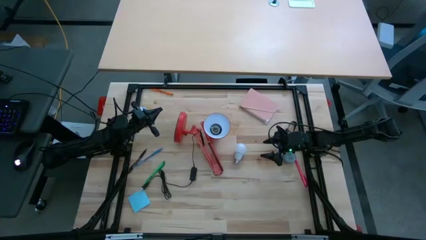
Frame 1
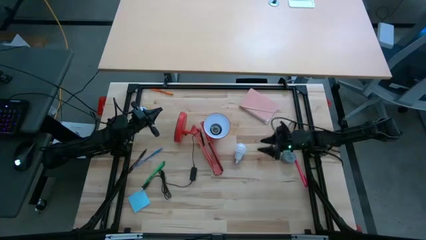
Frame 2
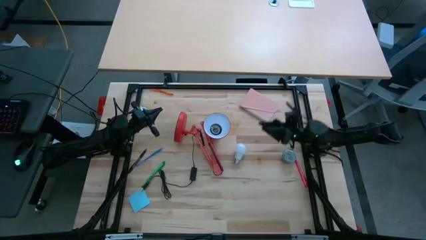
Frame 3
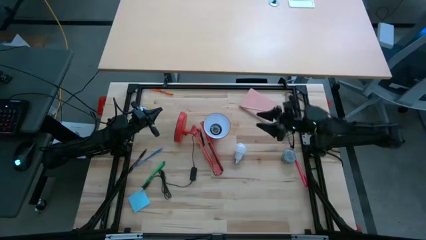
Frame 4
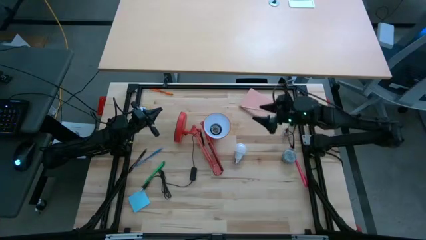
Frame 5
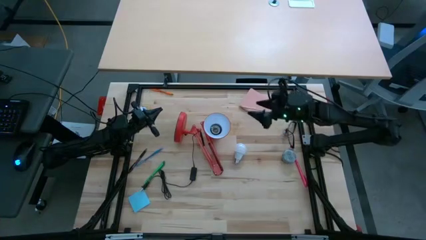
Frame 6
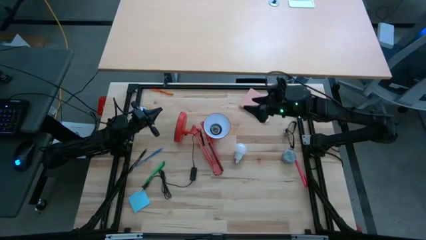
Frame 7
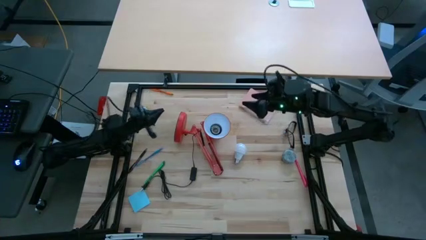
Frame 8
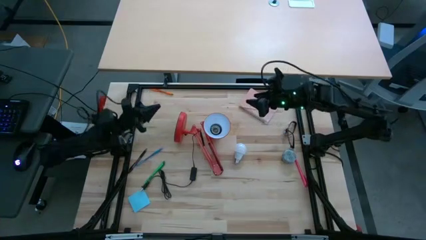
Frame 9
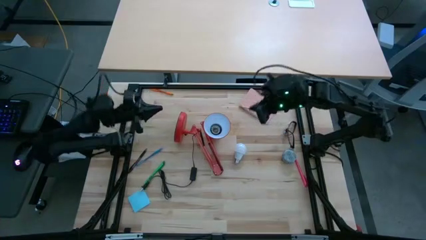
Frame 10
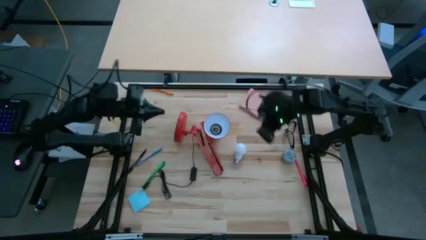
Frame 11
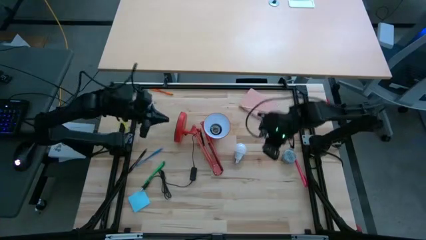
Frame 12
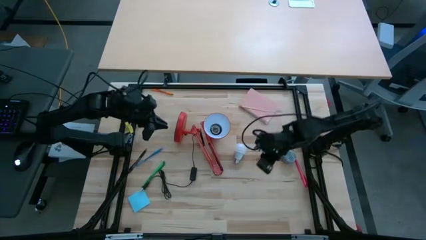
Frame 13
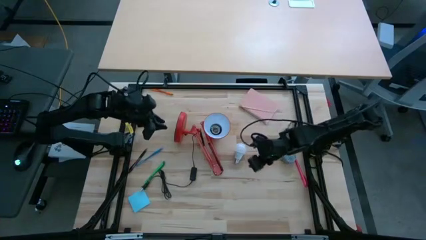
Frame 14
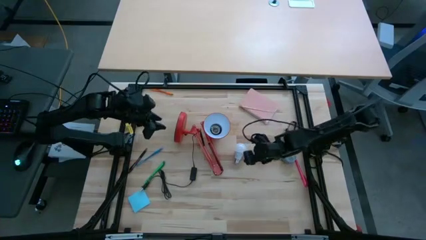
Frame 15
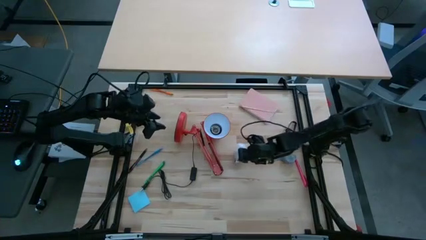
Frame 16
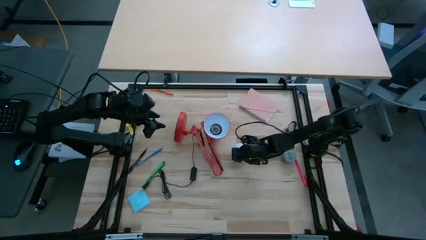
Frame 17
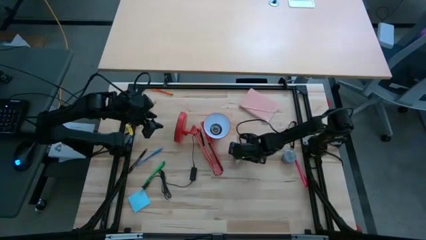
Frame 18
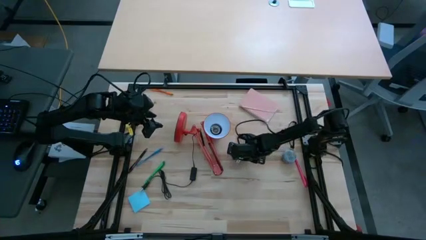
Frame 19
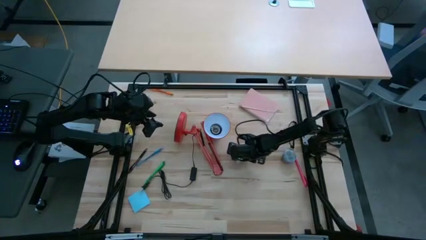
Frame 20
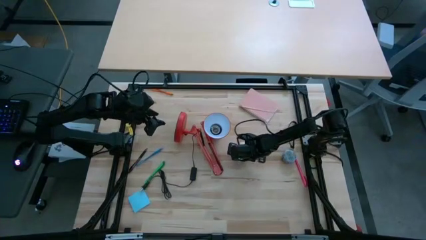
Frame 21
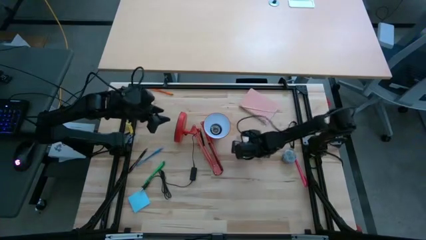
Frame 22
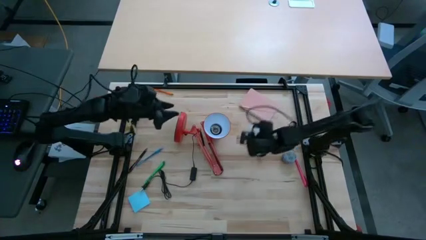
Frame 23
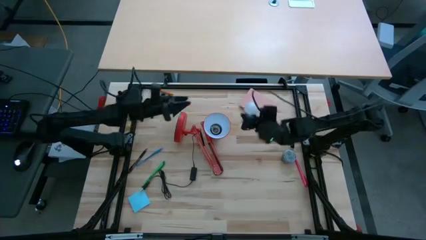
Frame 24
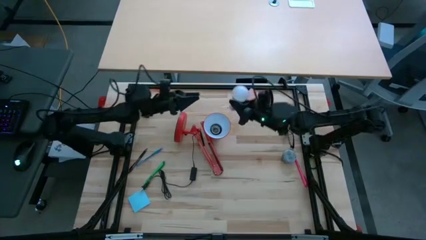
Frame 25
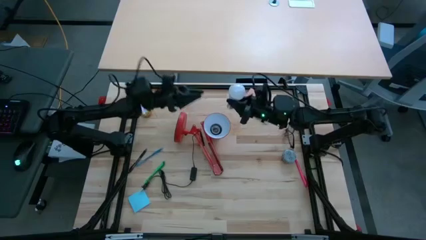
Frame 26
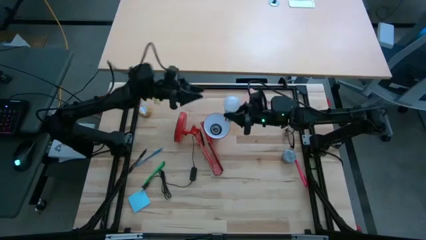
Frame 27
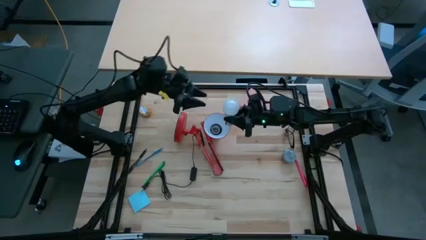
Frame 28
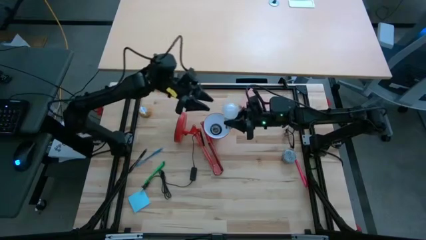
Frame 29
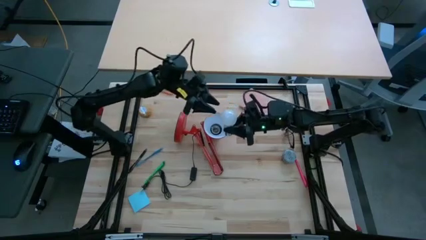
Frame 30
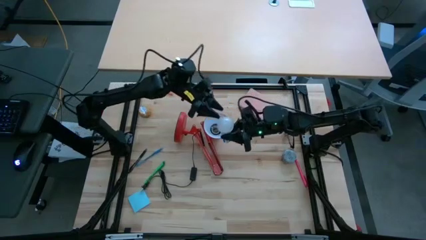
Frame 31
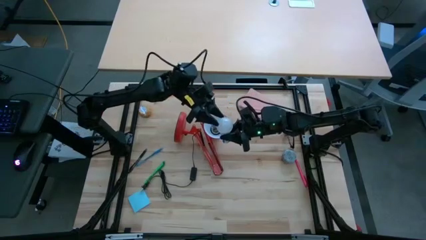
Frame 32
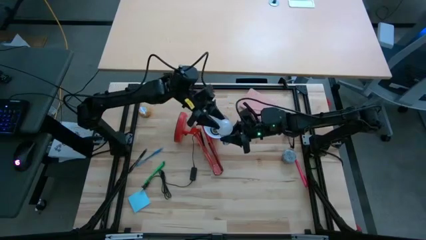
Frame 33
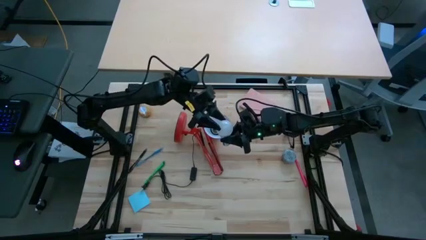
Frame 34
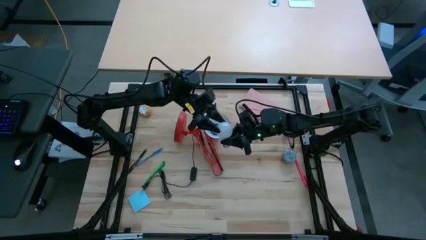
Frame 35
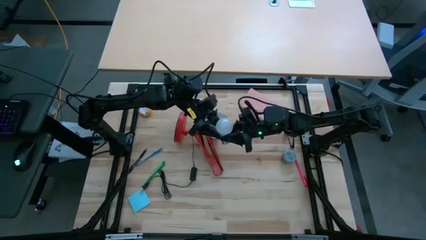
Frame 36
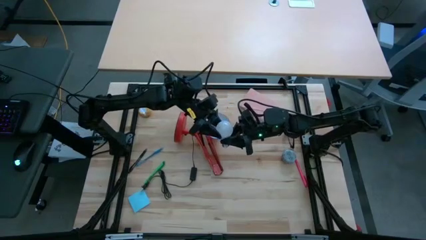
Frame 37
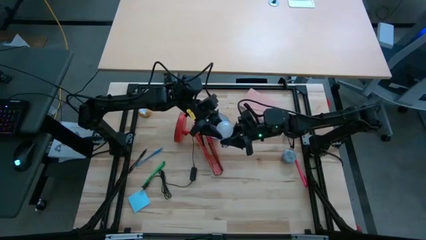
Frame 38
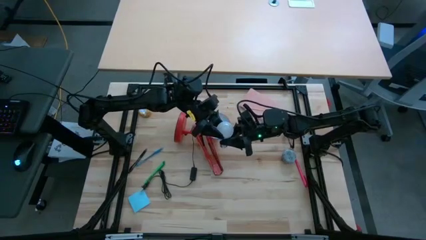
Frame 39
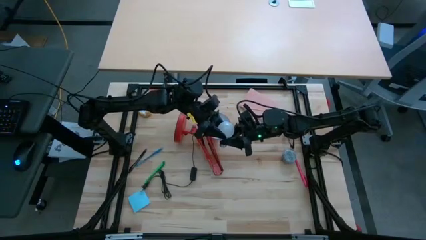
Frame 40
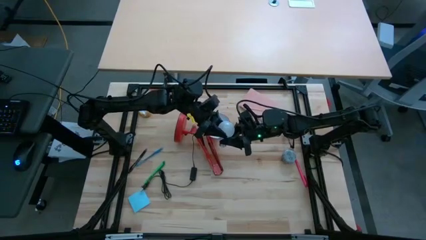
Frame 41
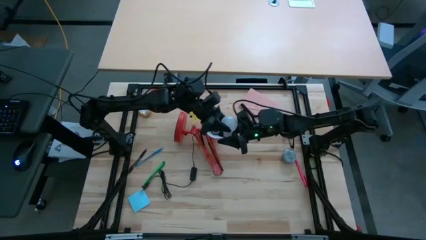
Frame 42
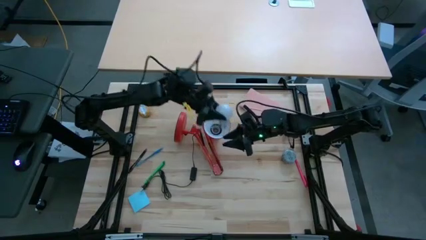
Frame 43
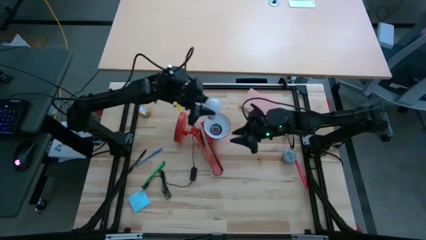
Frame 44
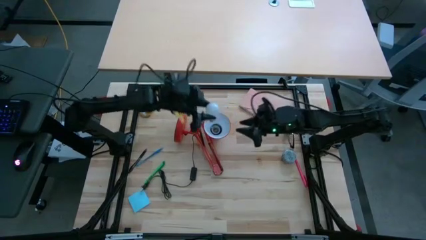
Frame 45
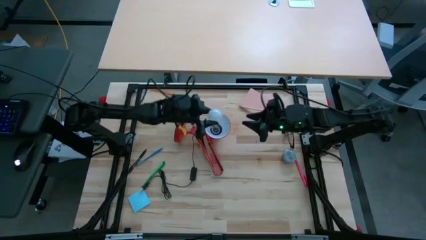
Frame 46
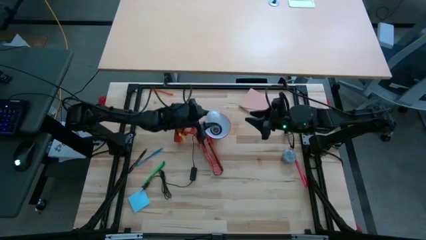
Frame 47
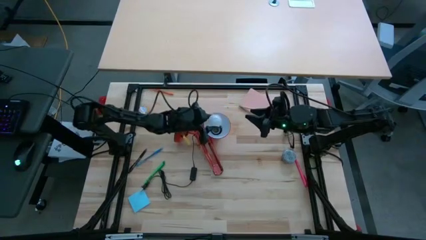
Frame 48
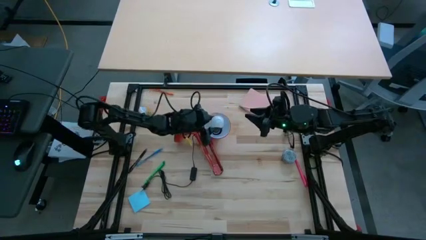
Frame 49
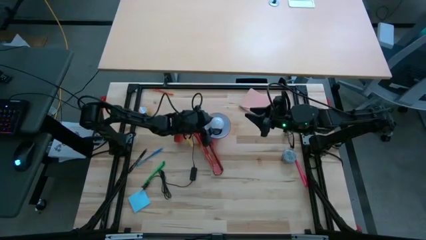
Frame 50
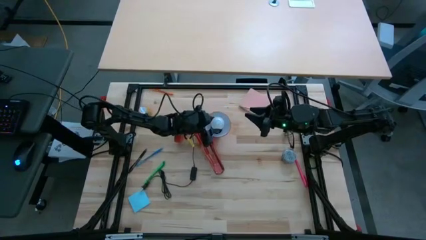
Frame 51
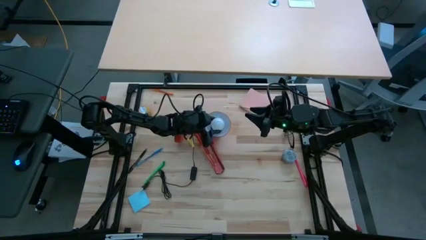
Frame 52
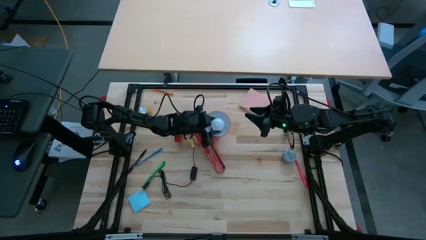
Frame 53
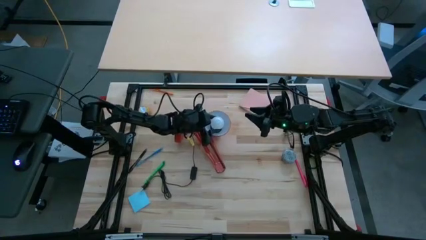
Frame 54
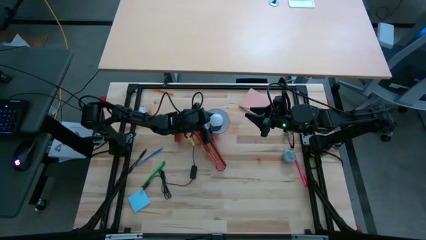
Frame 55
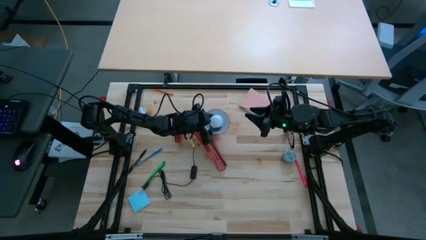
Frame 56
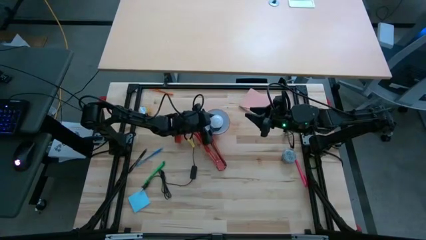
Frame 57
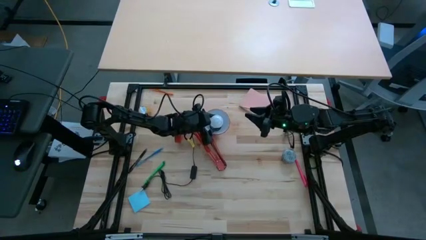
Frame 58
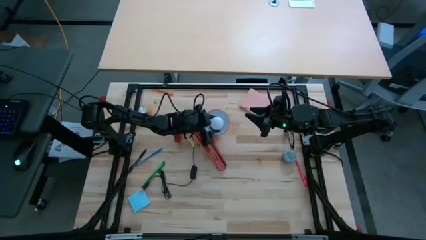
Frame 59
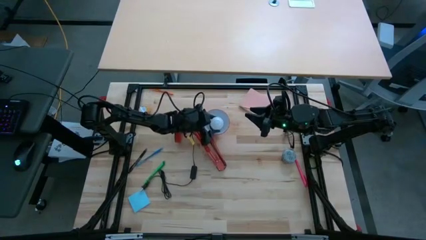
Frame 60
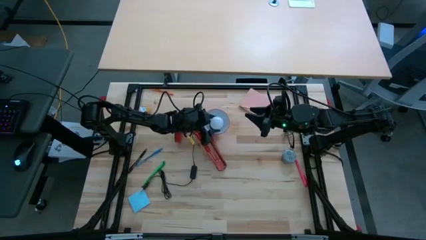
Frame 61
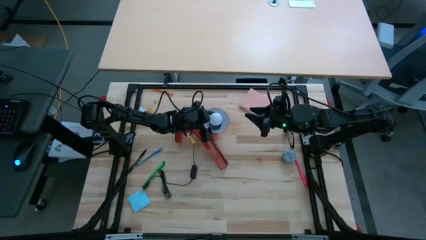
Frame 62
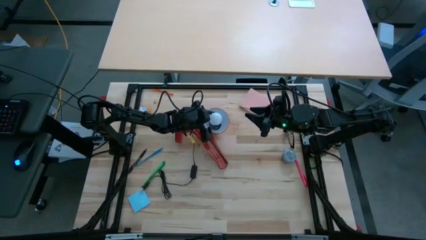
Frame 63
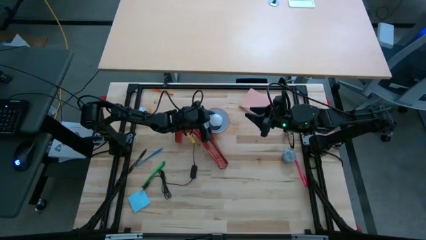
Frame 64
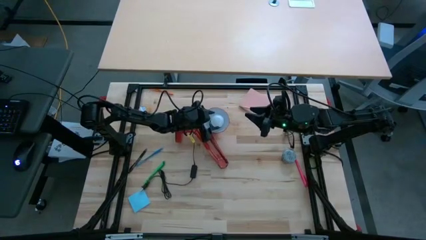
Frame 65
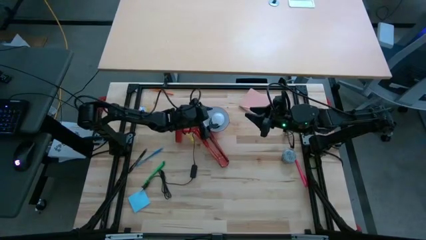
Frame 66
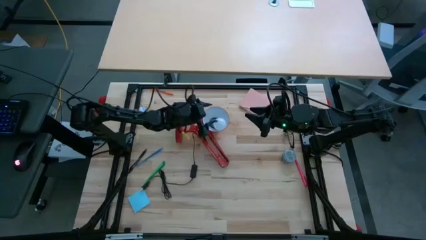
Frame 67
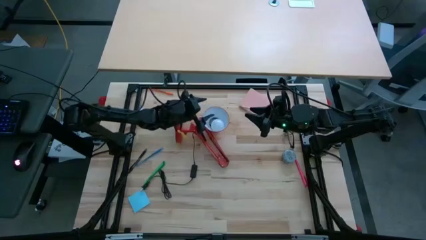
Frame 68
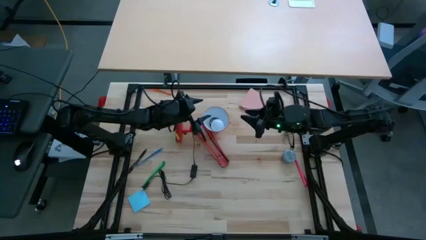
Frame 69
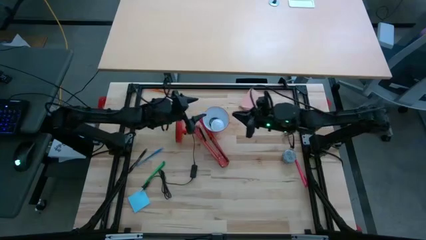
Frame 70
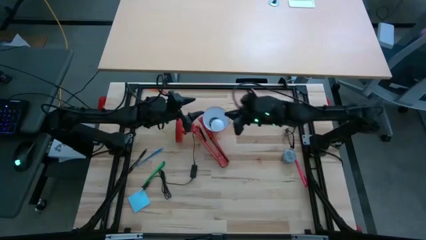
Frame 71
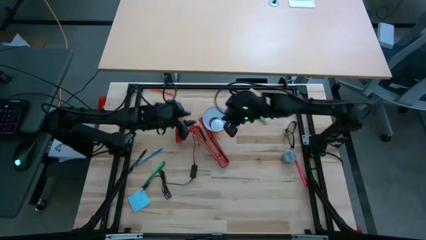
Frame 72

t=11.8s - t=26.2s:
Task: Screw lightbulb
Insert the white lightbulb into the red lamp
